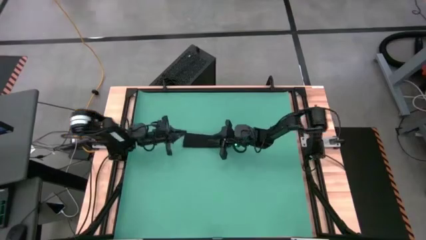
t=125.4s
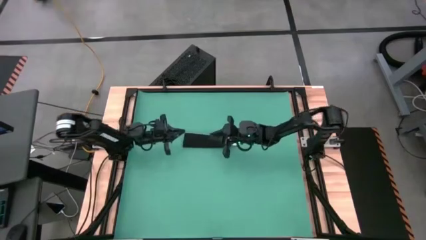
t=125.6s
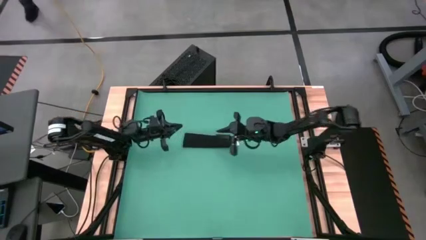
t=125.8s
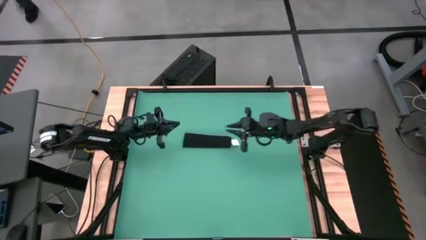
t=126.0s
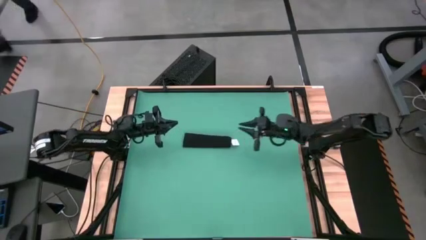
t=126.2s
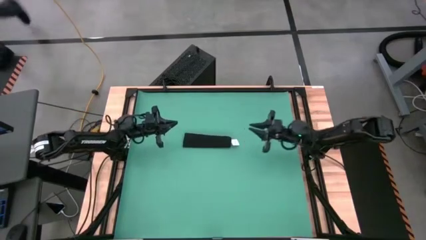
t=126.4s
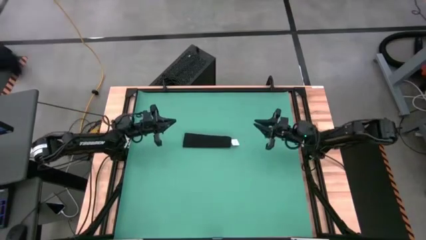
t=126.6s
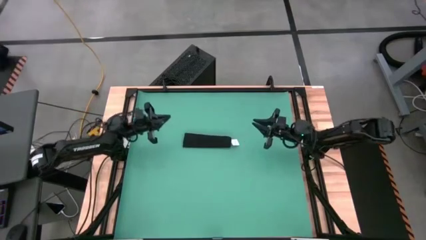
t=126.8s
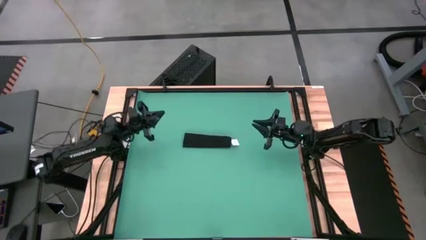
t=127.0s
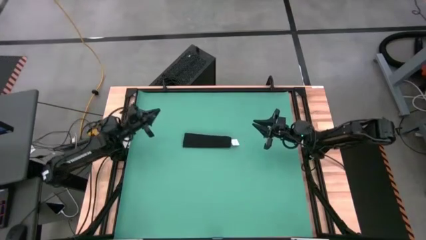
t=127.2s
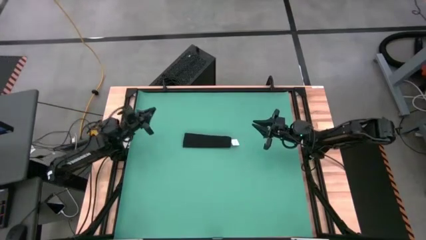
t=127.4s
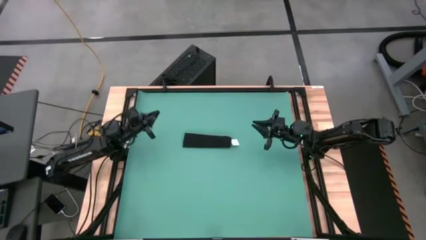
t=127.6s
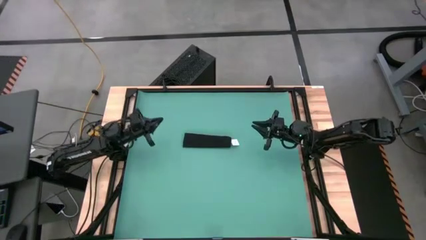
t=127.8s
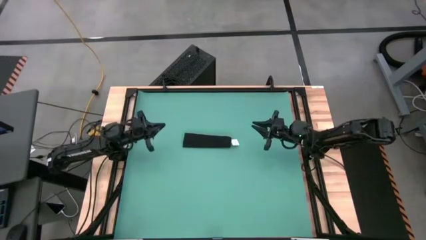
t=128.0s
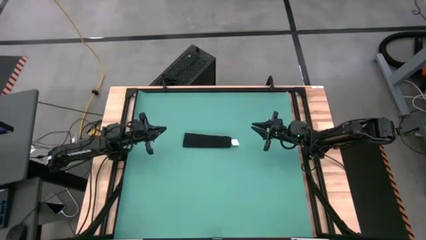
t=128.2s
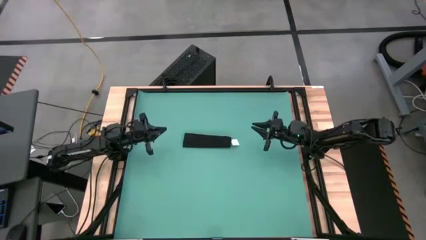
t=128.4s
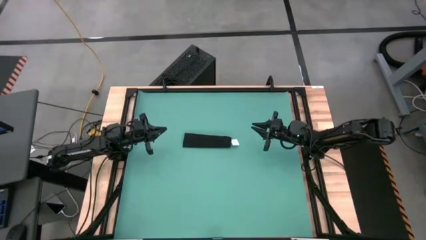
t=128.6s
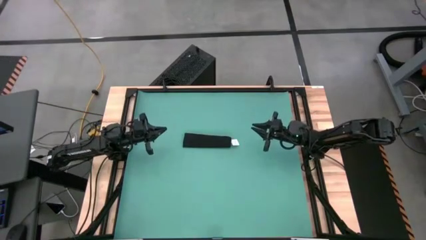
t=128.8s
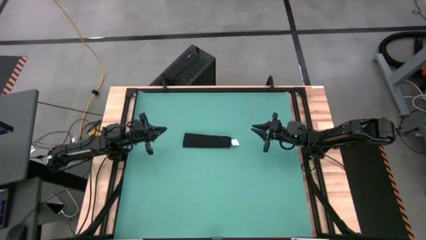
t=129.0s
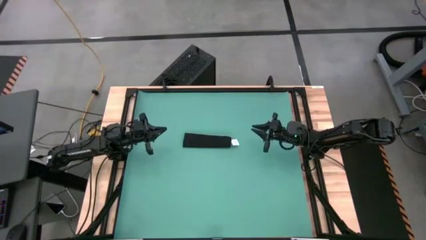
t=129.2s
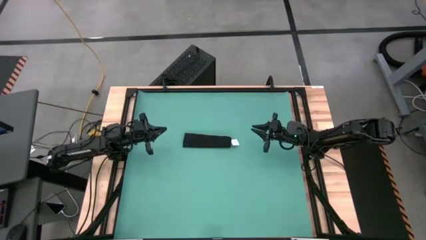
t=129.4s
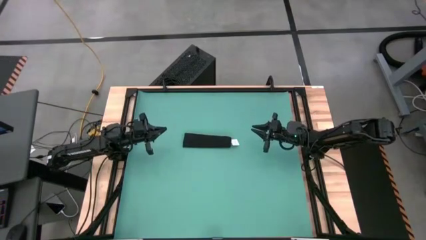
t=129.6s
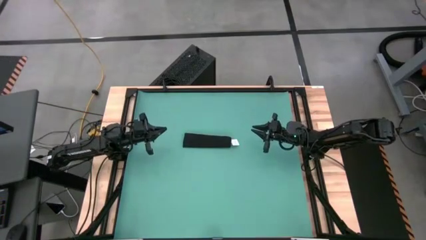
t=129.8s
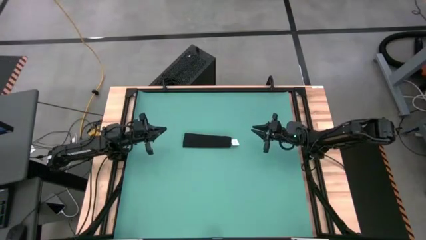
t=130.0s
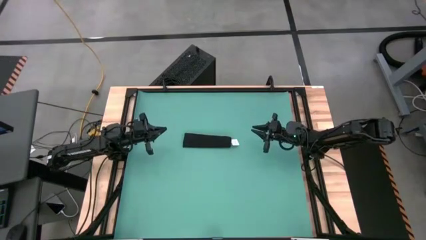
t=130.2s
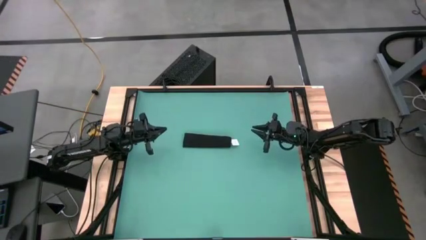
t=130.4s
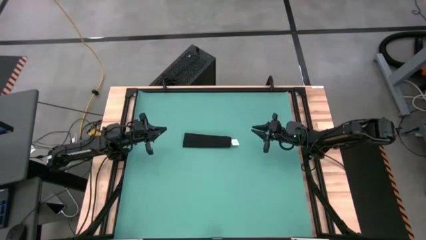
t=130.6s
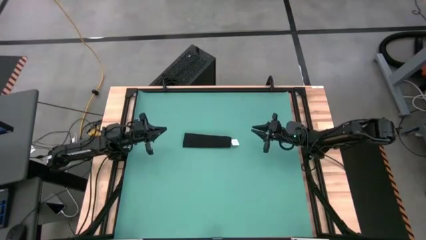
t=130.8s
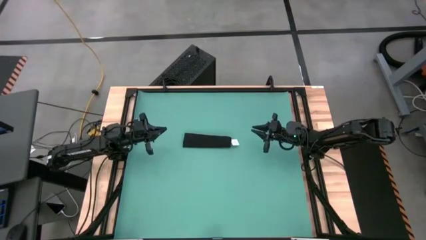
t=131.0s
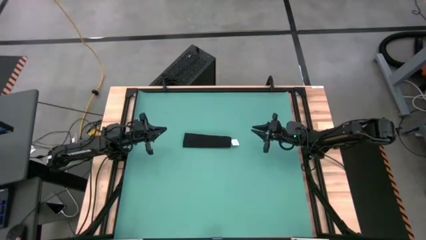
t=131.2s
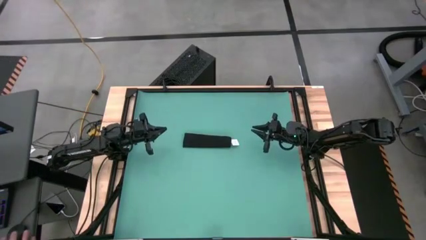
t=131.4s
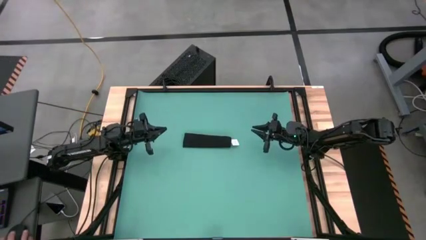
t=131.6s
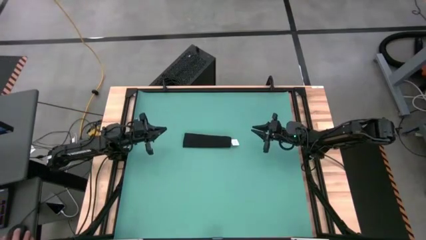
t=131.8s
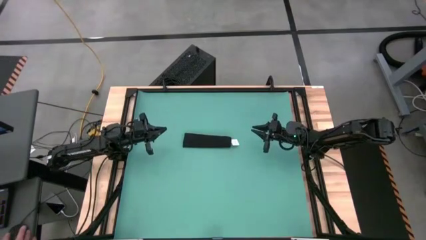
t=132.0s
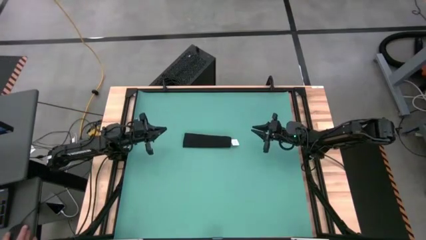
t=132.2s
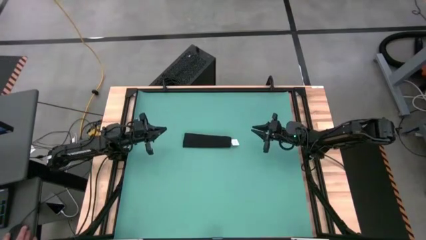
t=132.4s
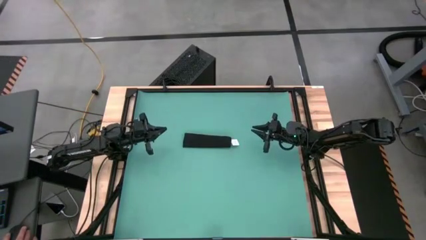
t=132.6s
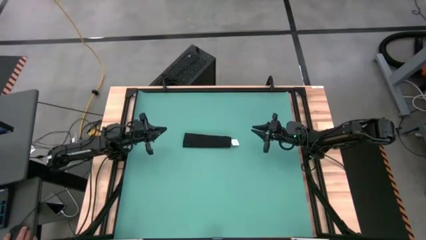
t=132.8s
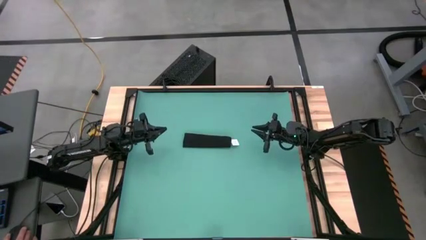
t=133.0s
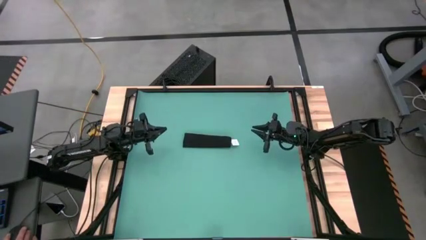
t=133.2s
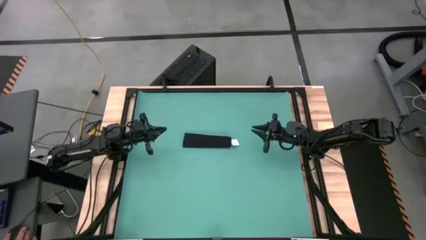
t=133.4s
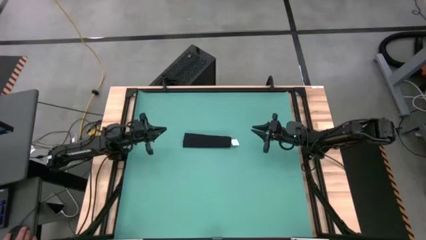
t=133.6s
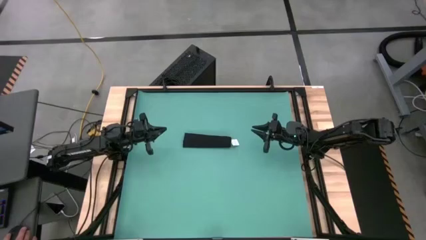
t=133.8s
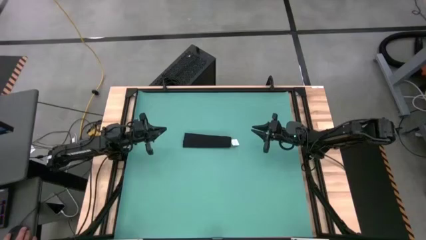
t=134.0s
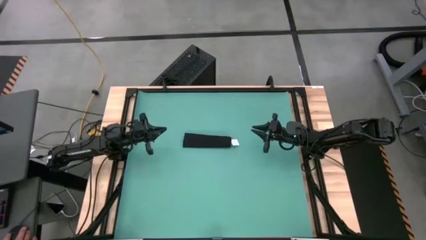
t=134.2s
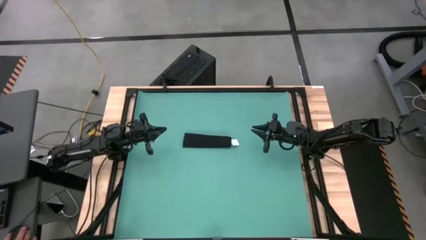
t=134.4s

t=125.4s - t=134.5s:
Task: Roll napkin
Return to Home Position

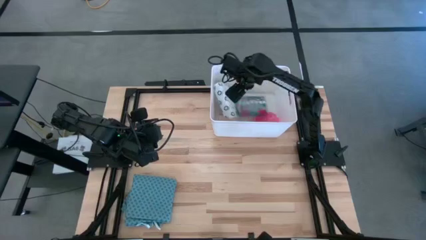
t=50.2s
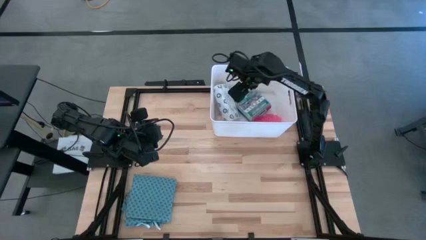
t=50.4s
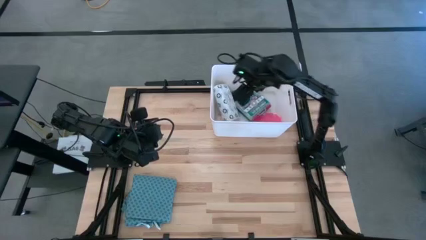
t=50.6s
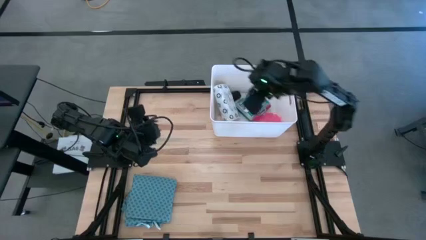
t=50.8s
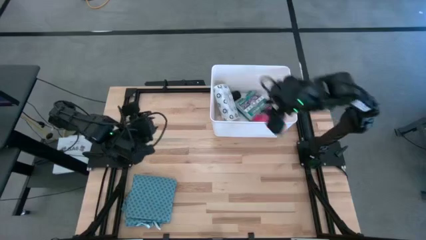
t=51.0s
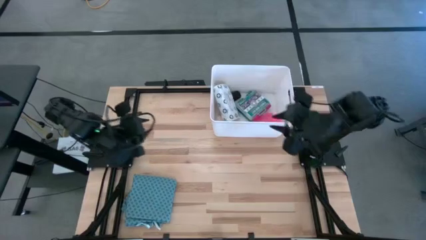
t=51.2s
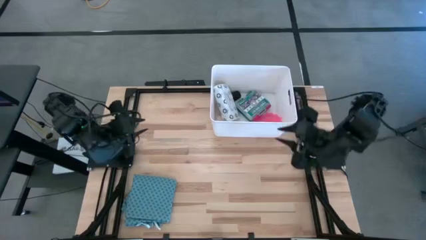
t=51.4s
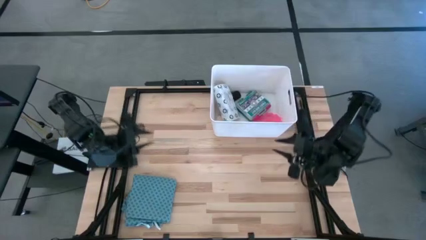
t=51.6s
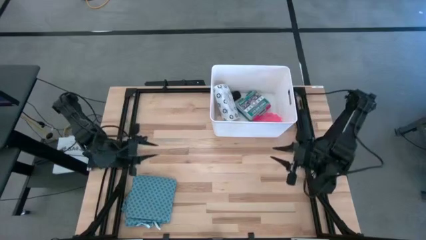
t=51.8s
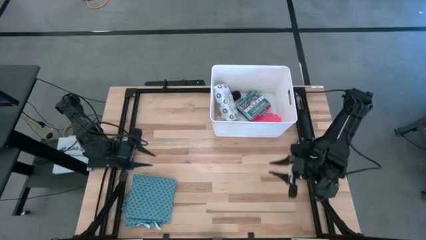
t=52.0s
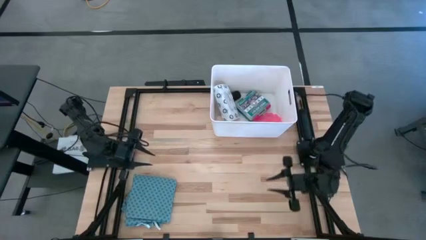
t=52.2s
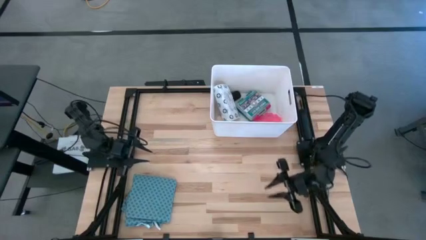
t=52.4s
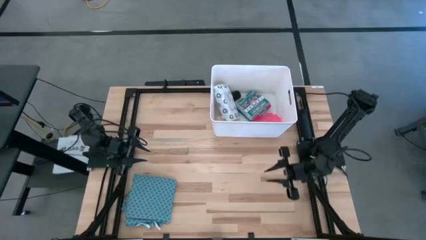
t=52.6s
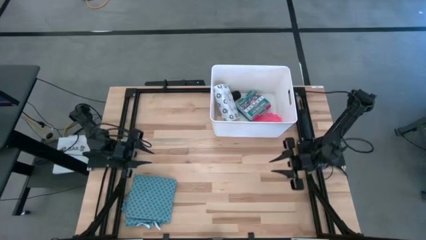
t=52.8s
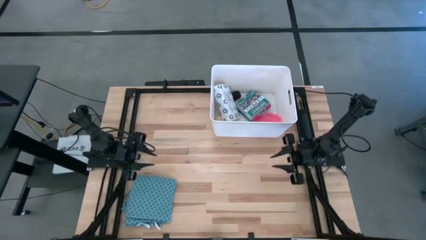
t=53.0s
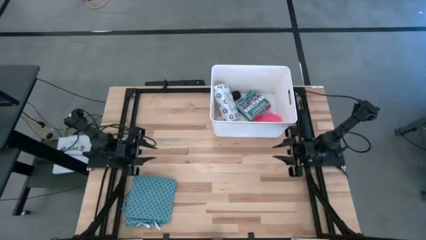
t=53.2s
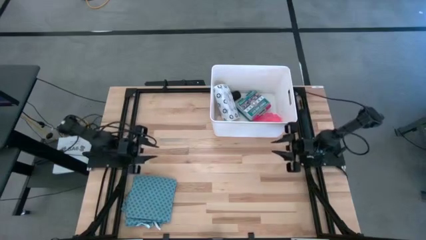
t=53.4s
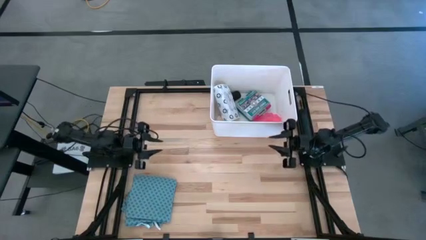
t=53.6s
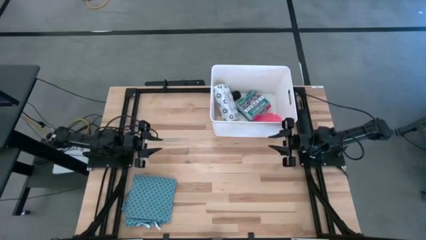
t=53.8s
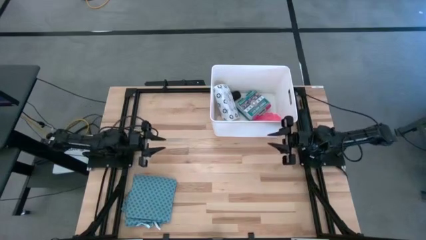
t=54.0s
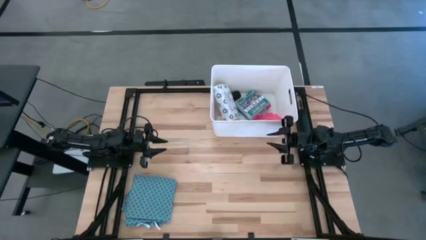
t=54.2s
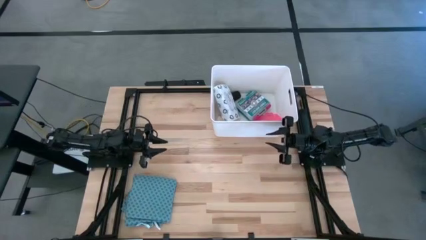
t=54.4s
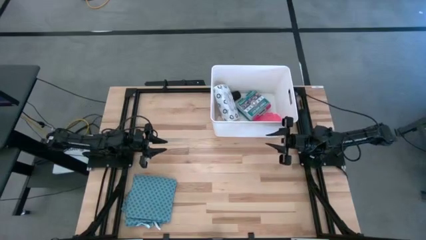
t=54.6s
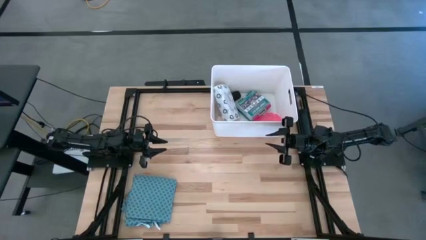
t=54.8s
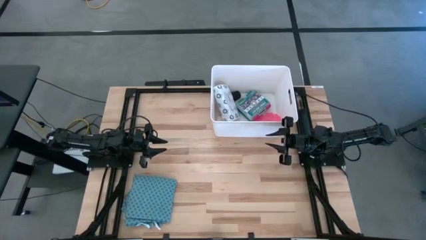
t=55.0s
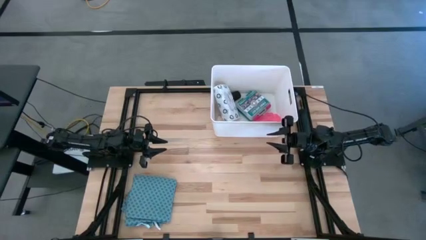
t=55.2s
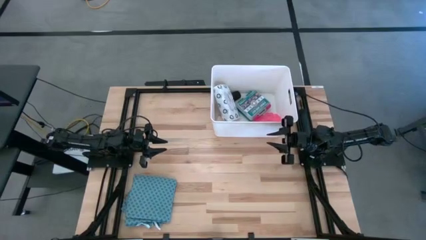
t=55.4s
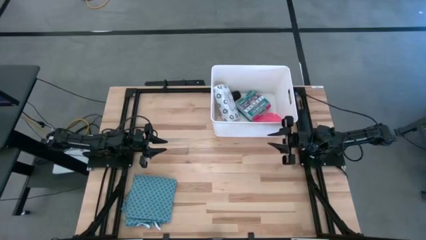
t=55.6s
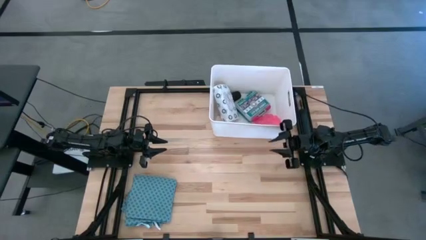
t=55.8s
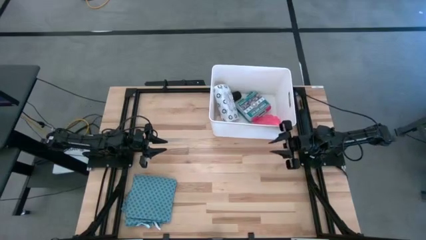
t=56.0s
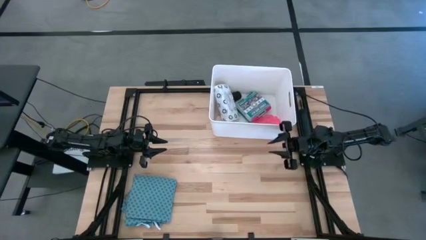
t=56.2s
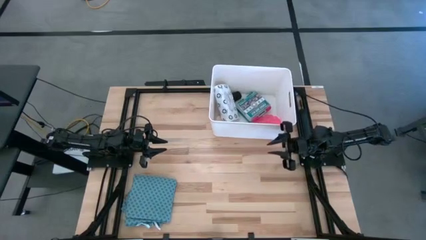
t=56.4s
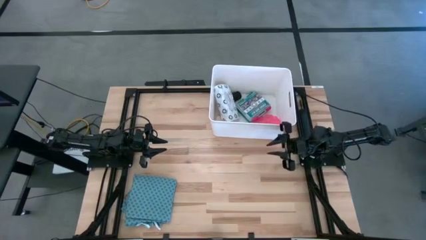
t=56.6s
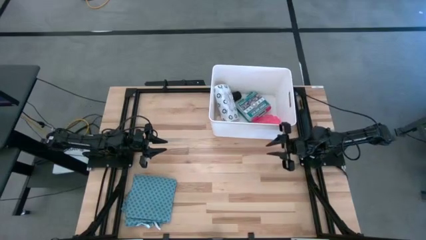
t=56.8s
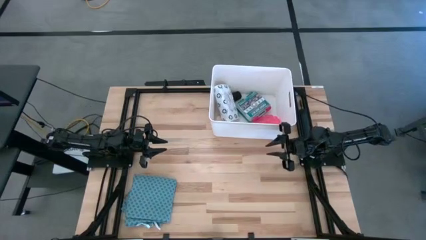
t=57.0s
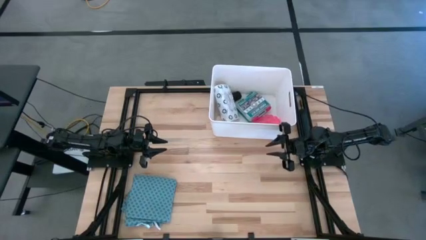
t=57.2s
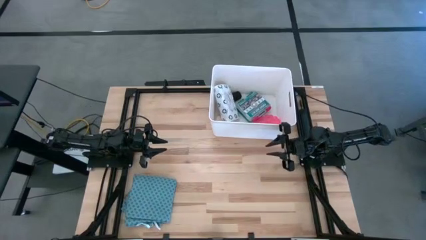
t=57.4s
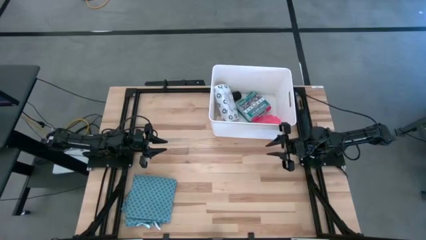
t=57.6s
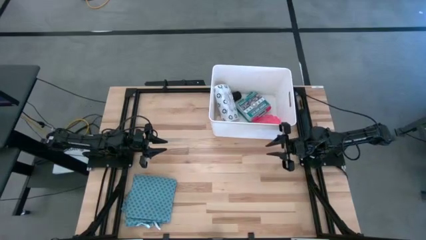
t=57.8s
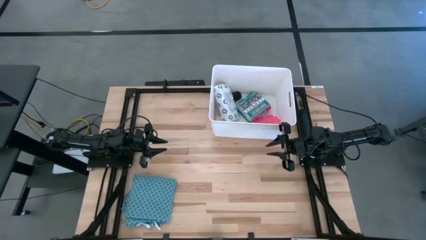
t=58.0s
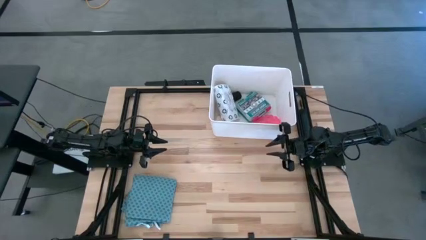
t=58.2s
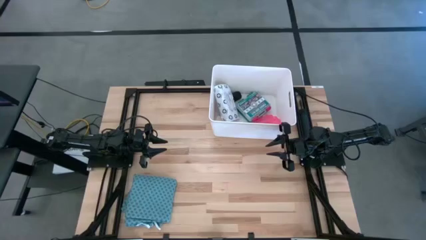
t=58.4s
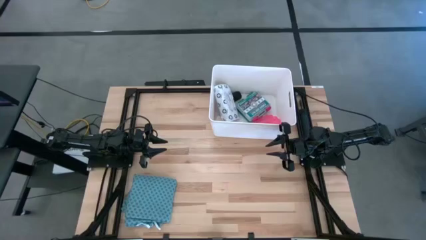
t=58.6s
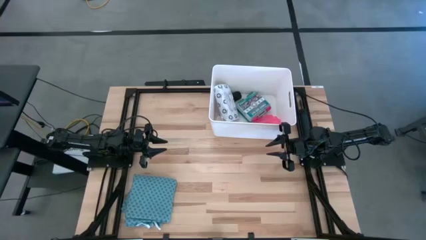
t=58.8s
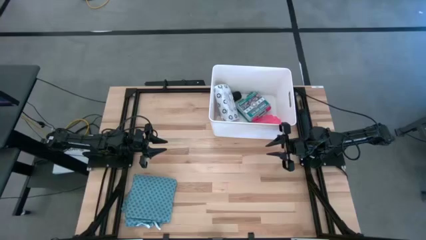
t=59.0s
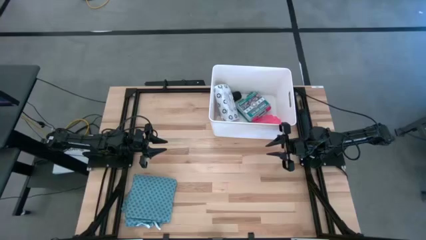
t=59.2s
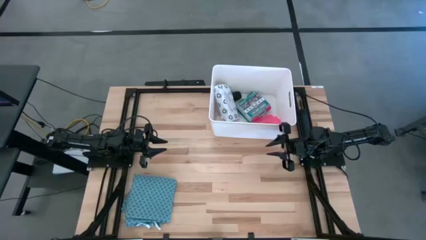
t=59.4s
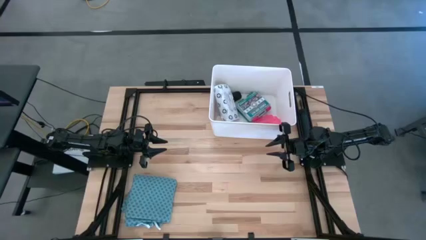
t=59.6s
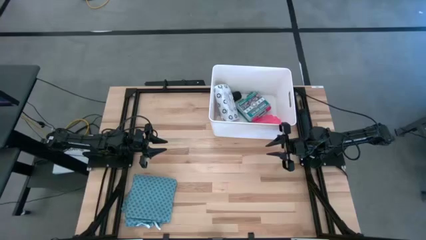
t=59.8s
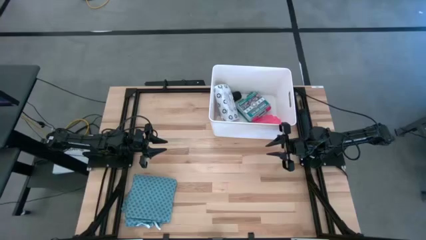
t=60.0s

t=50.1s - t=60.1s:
Task: Pick & place medical supplies in basket/bin
Return to Home Position
